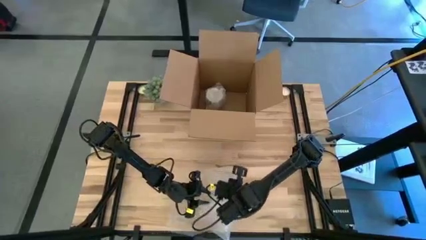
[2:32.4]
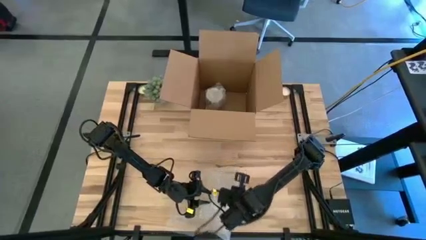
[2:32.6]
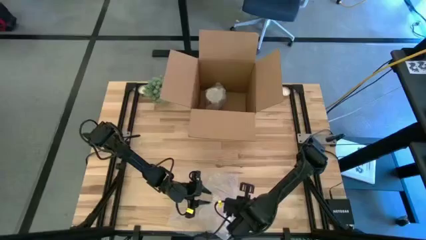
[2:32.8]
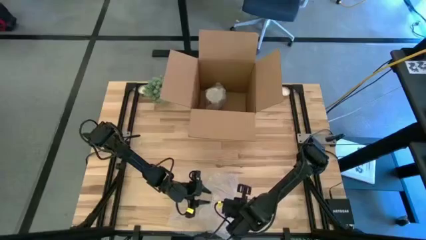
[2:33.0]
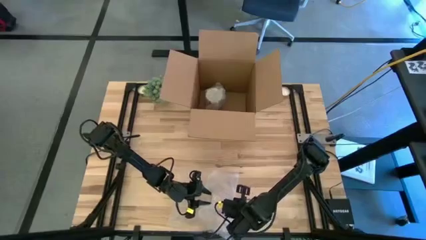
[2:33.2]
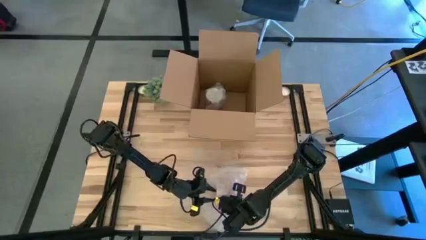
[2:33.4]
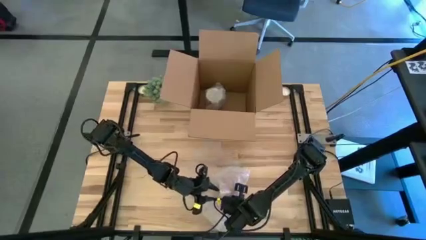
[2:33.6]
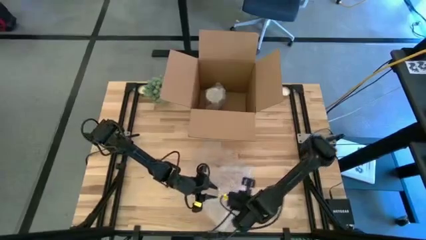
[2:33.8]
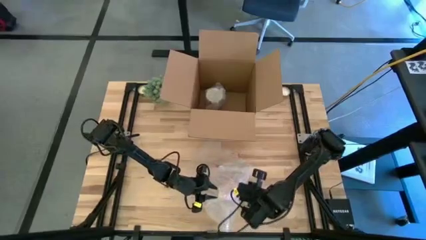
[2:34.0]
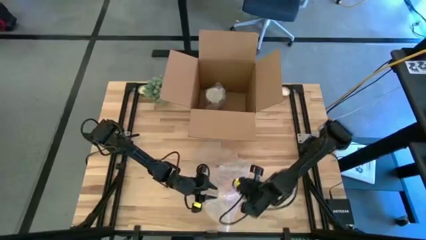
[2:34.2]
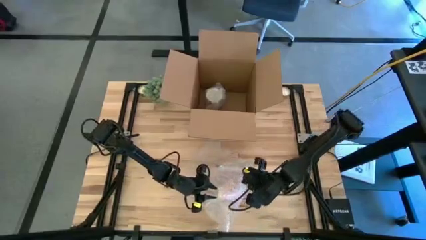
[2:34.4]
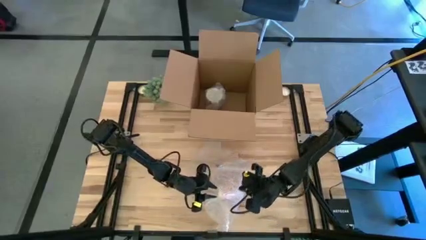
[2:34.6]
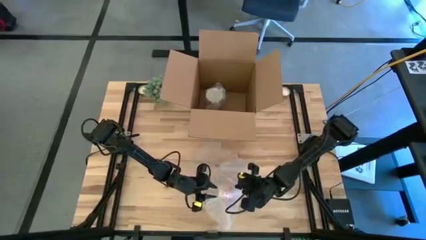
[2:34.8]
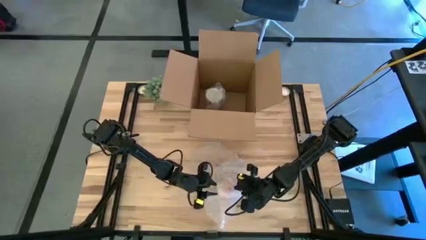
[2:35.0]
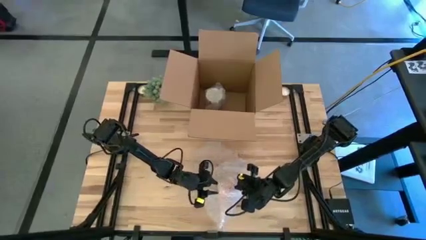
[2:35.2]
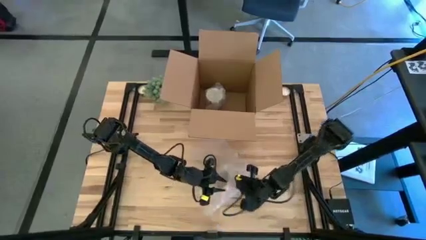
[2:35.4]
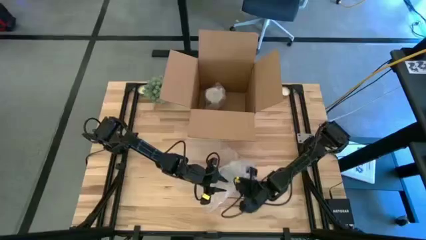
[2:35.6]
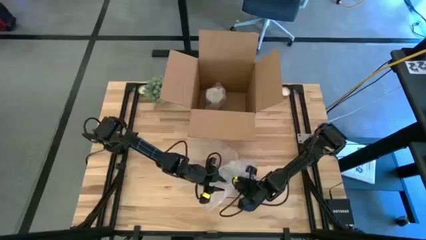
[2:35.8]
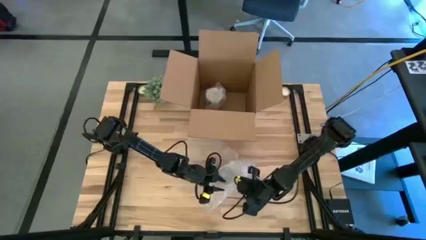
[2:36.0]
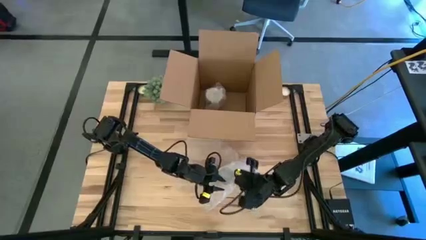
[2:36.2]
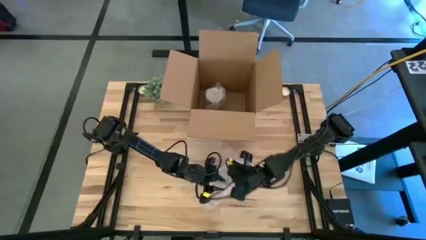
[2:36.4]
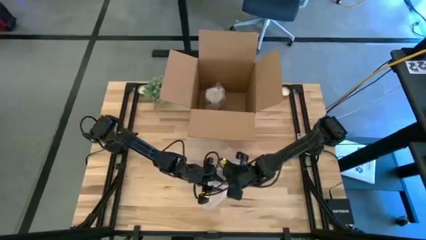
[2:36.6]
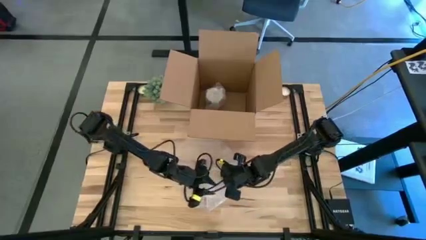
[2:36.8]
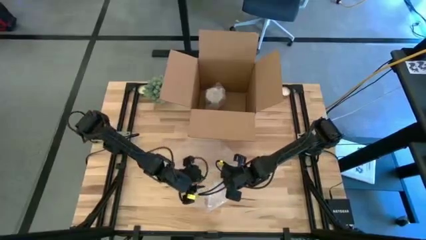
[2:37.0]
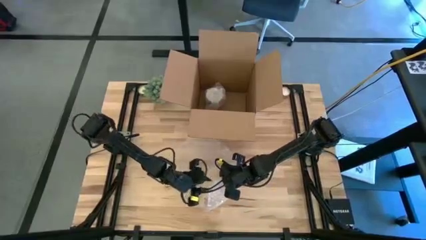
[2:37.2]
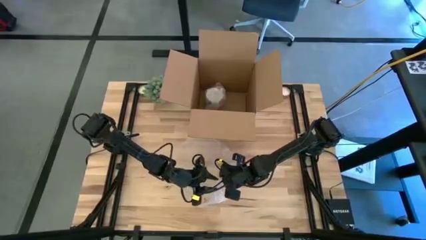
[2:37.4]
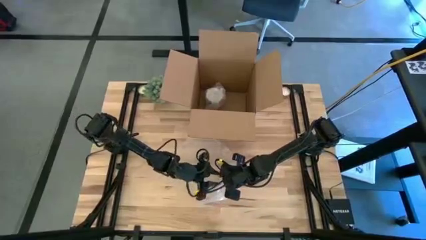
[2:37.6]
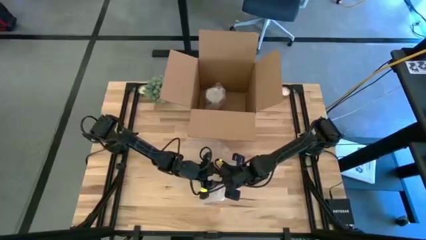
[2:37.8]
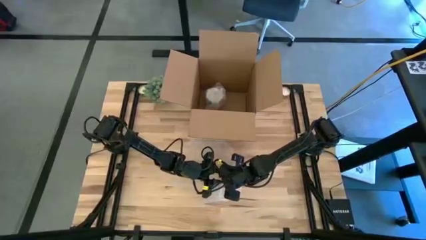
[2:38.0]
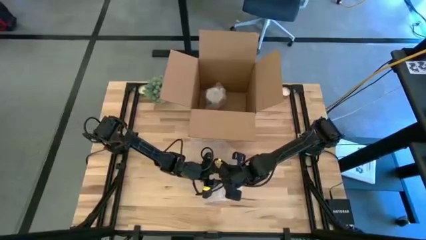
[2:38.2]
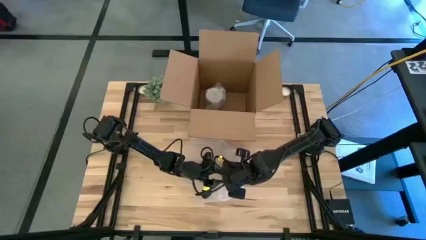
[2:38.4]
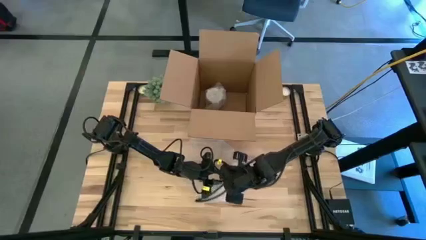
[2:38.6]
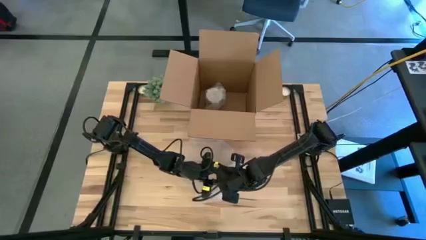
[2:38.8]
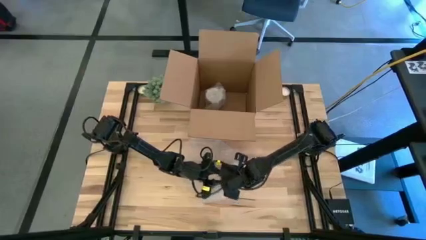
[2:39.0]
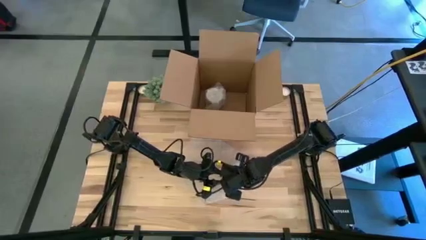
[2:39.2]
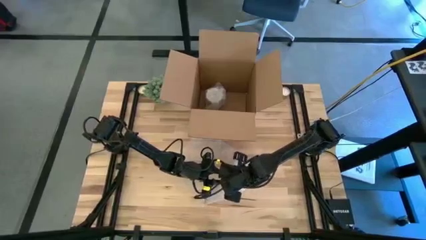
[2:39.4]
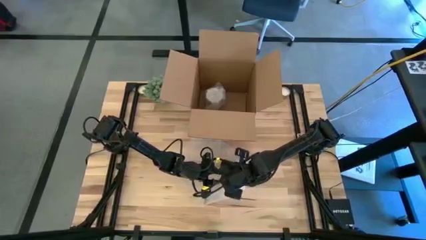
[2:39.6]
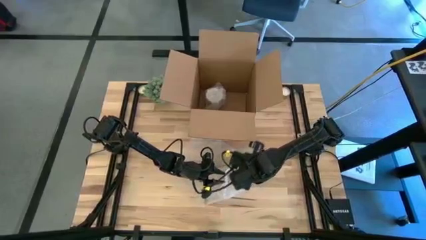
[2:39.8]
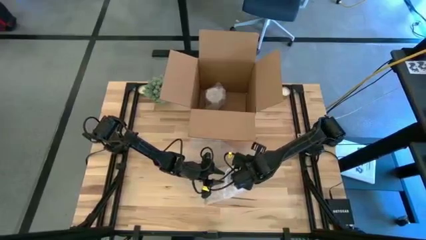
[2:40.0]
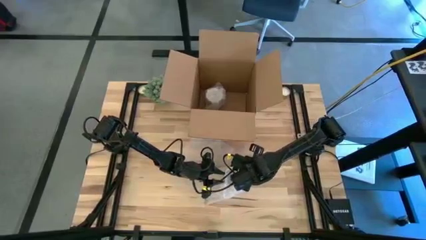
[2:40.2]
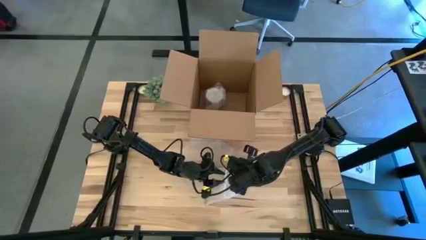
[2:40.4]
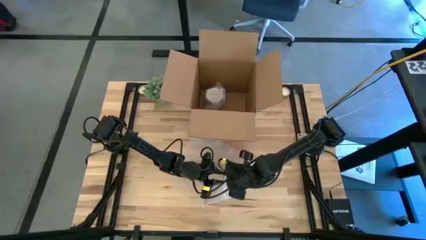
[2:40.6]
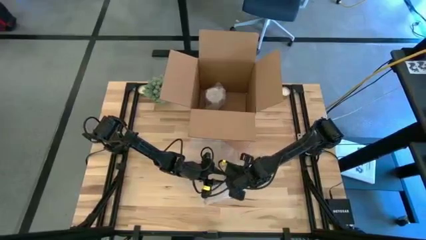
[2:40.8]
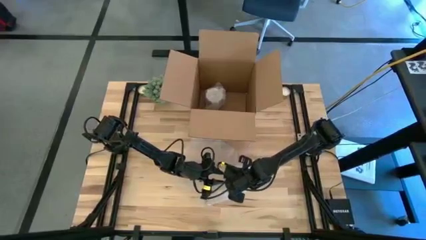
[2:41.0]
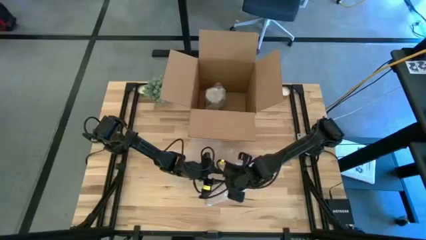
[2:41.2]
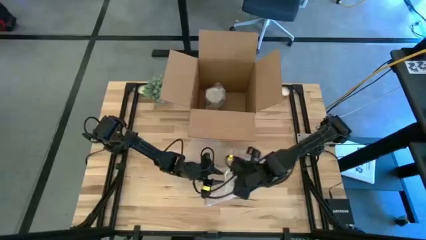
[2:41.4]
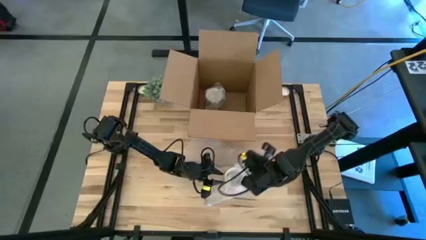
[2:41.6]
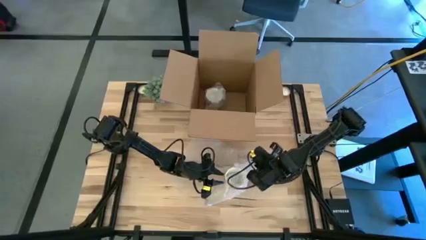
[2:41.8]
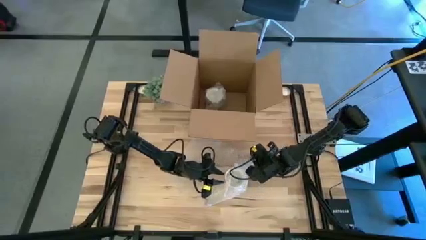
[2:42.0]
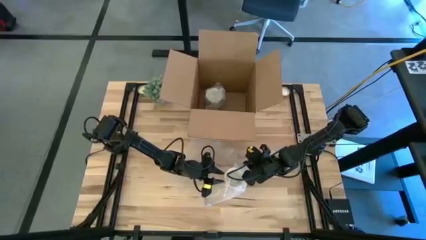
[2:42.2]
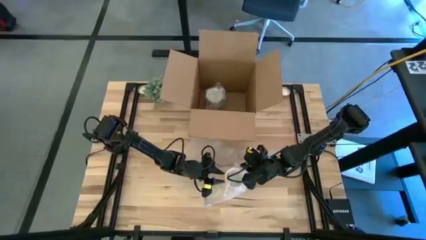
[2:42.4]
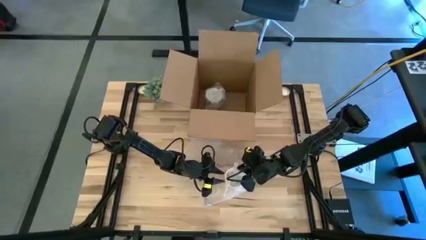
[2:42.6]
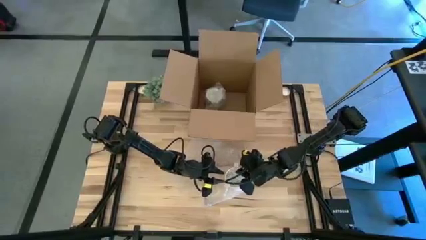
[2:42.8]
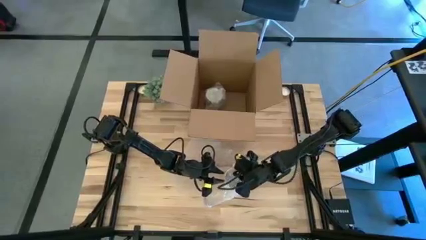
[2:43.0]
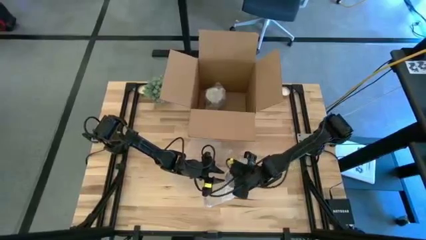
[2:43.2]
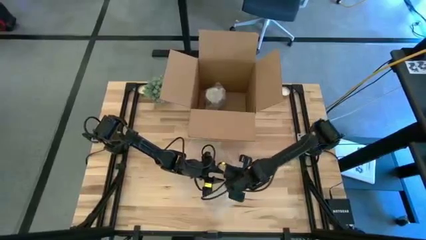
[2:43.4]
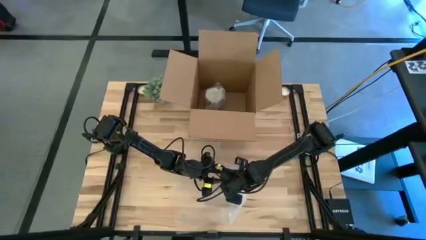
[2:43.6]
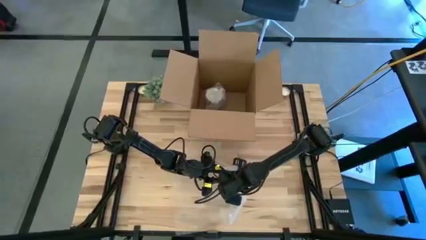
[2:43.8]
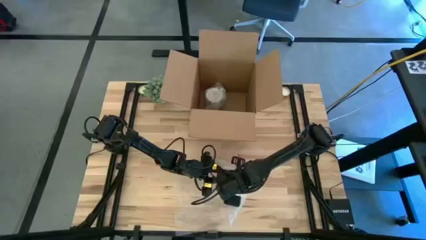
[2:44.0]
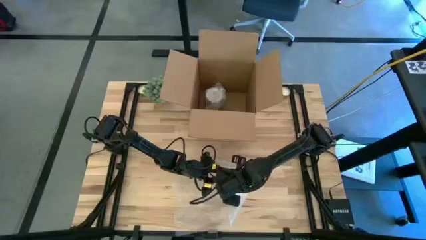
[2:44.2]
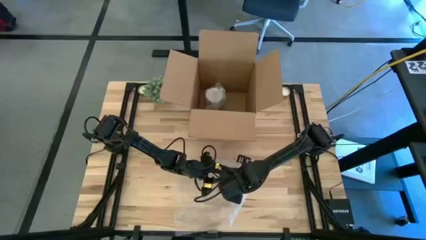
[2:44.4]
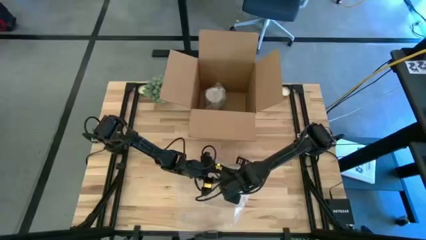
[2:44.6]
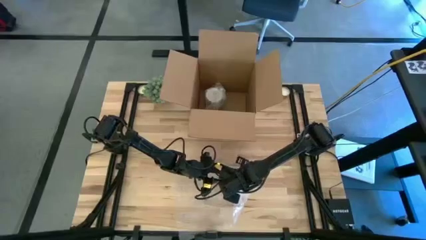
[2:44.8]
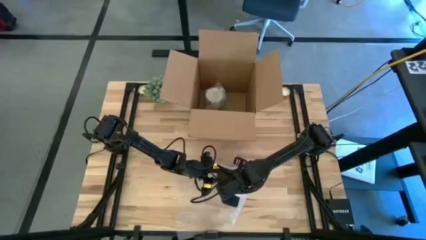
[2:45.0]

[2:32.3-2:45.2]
Task: wrap mug
Wrap the orange mug with bubble wrap

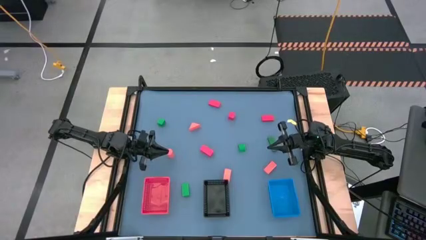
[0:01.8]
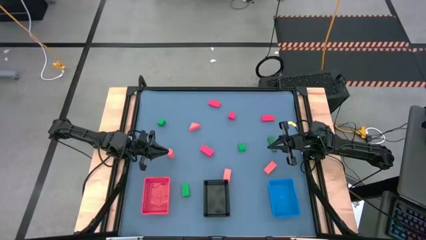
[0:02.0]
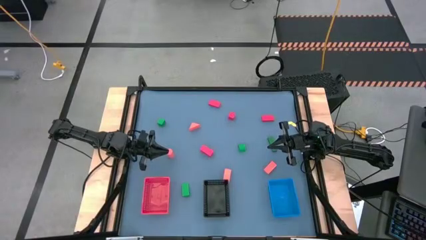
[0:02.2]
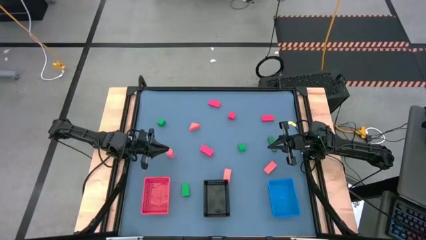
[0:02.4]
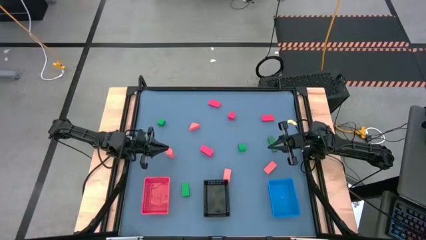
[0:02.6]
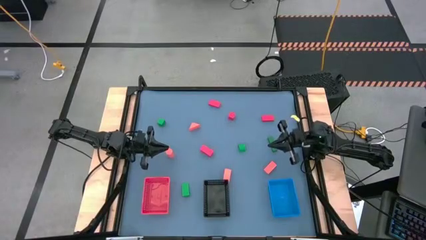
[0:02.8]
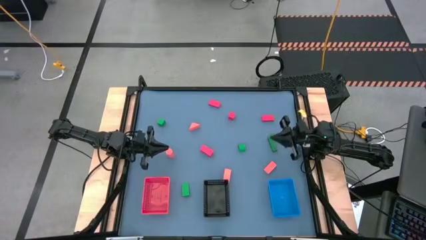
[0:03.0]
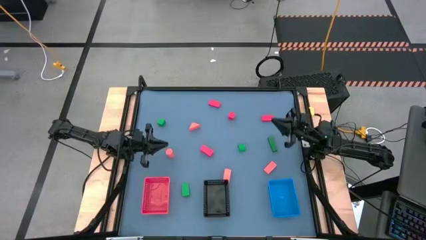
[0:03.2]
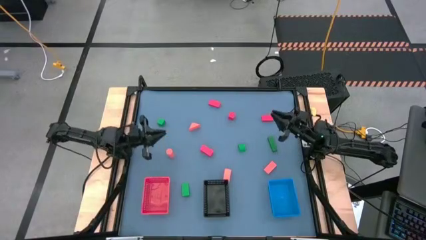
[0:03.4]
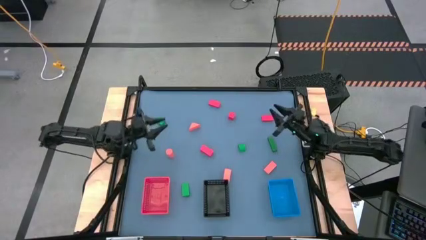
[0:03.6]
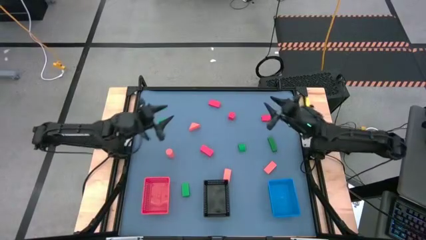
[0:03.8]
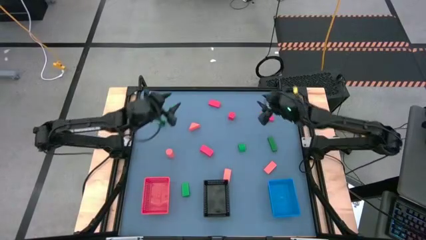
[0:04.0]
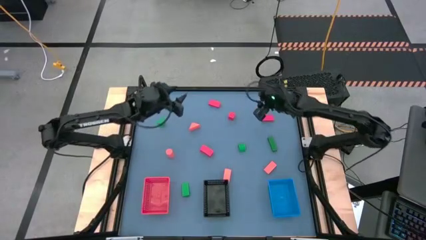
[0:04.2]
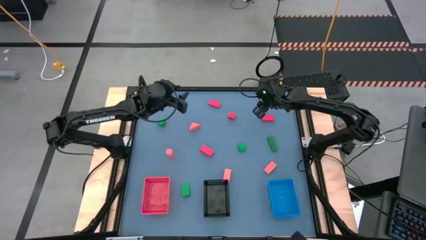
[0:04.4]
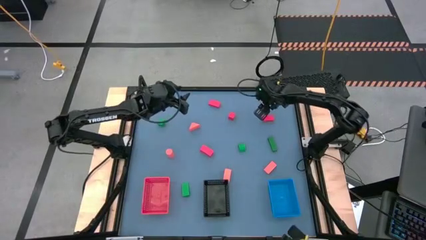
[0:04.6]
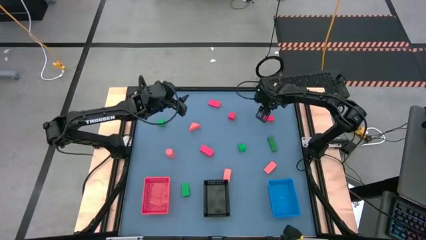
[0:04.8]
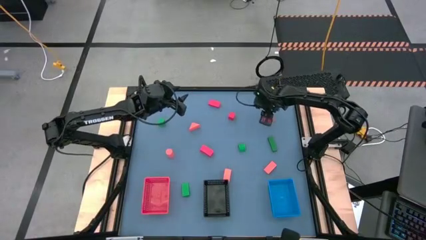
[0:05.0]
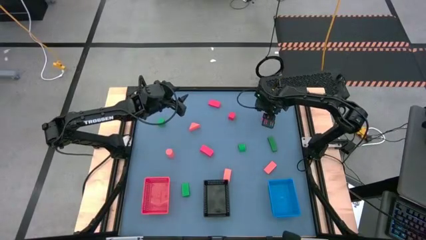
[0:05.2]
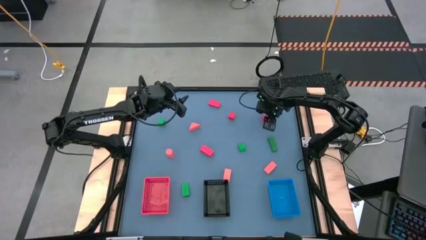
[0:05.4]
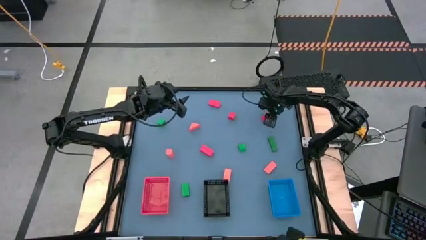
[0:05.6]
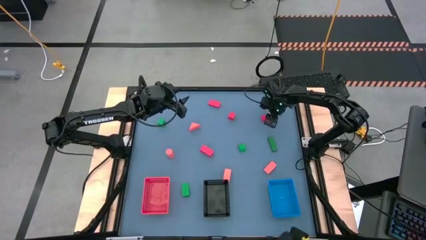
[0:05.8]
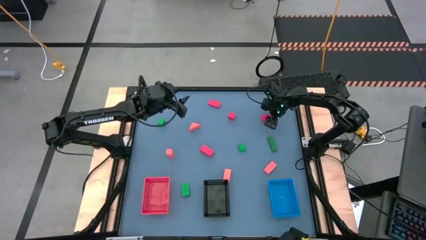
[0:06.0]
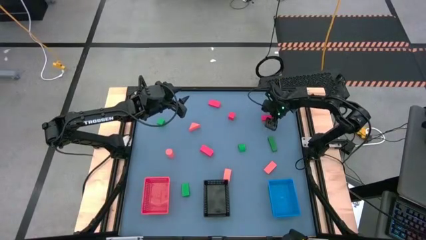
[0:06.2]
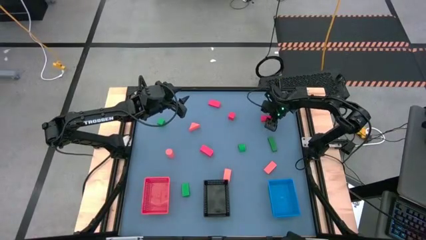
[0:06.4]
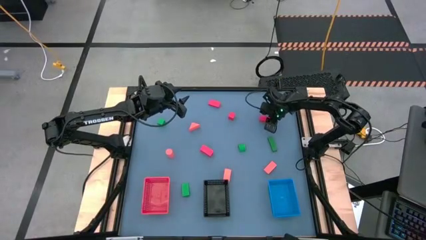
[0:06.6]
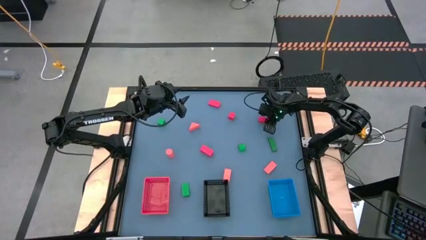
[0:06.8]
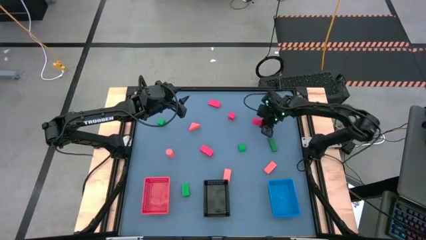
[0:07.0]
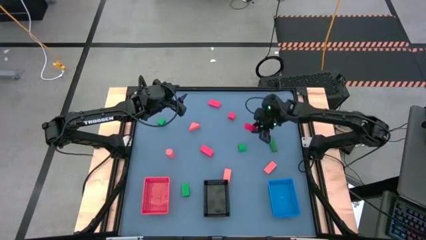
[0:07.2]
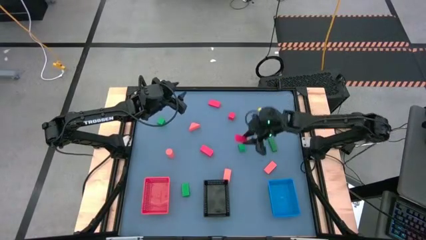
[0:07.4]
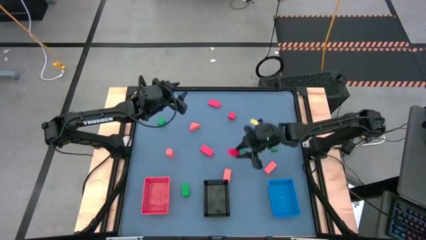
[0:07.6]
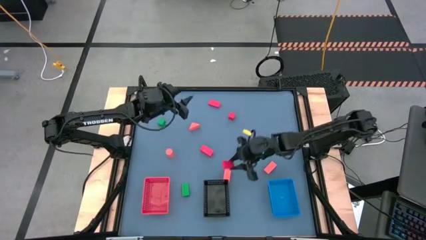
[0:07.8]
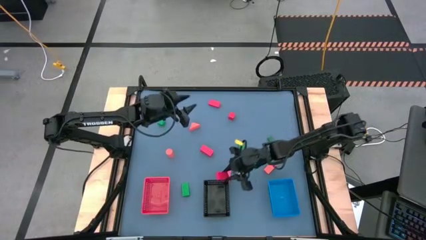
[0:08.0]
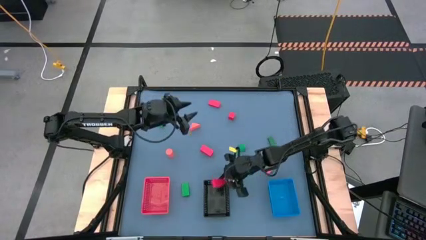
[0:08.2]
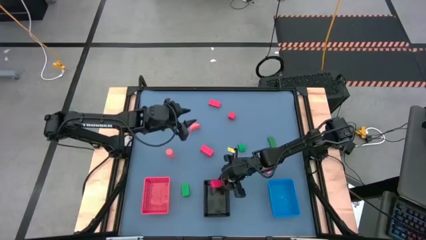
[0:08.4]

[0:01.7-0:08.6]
Task: Sort & place blocks by color
Put the red block into the black bin
